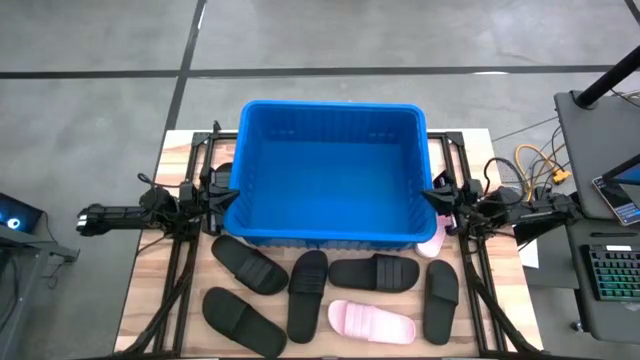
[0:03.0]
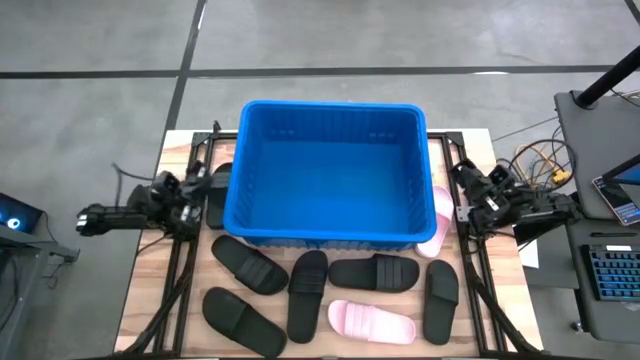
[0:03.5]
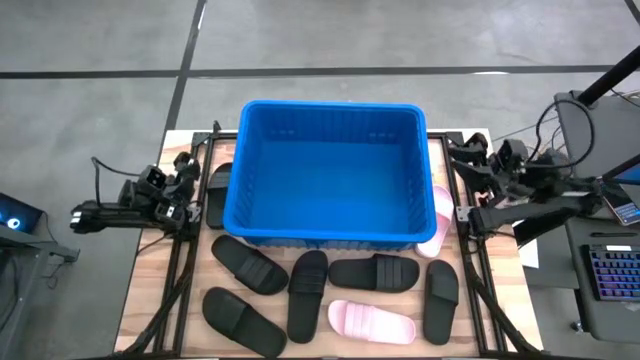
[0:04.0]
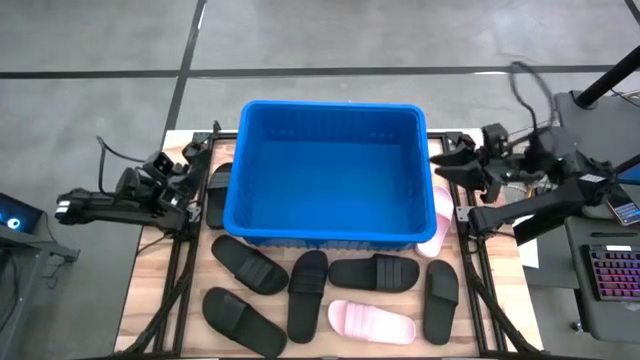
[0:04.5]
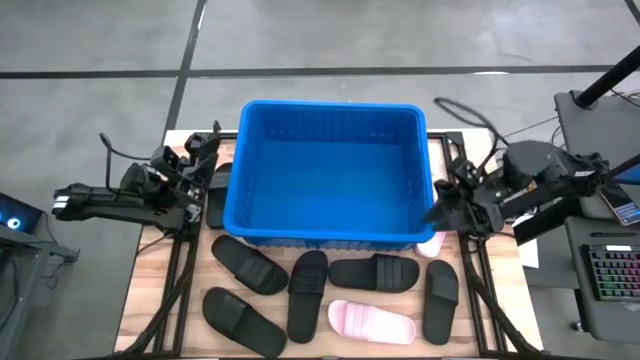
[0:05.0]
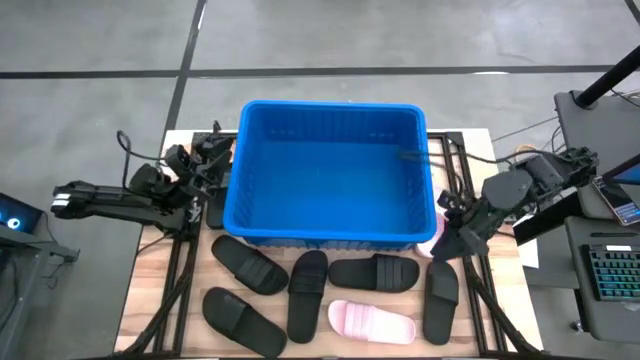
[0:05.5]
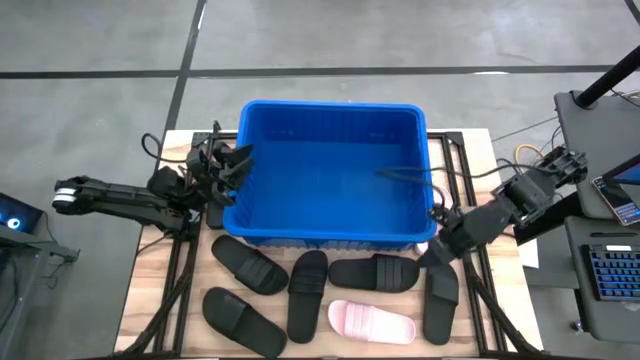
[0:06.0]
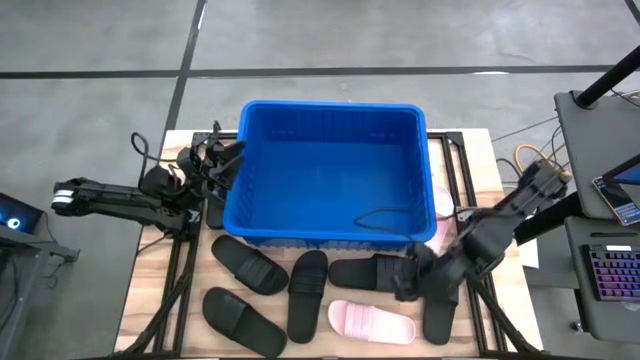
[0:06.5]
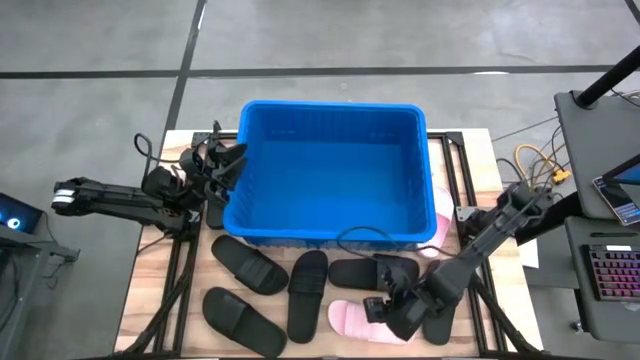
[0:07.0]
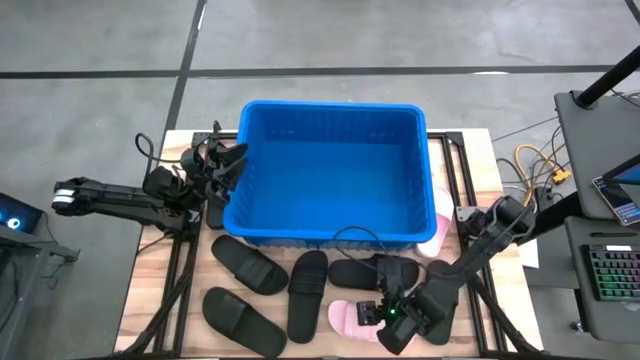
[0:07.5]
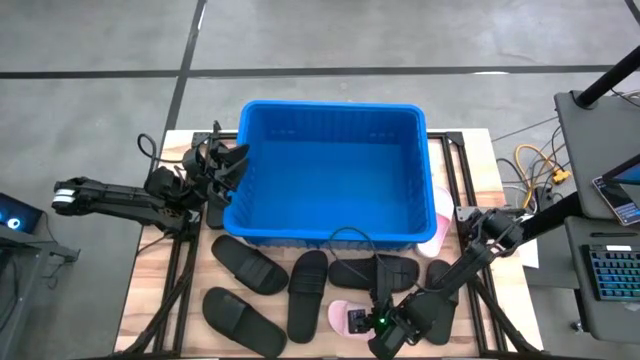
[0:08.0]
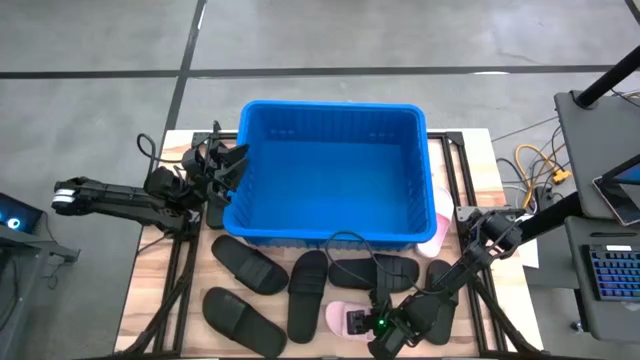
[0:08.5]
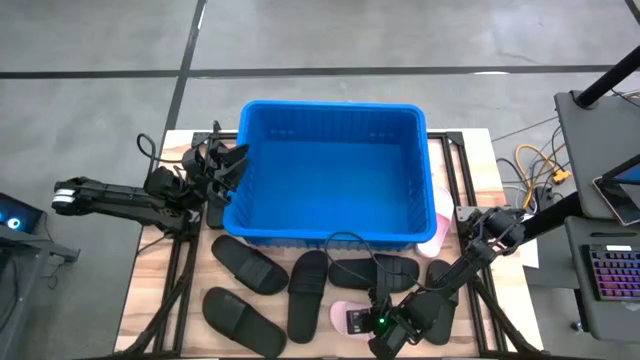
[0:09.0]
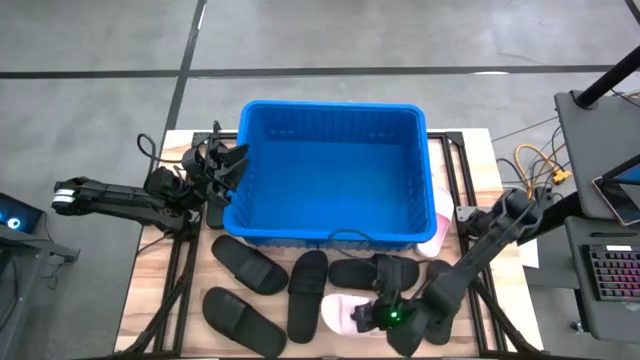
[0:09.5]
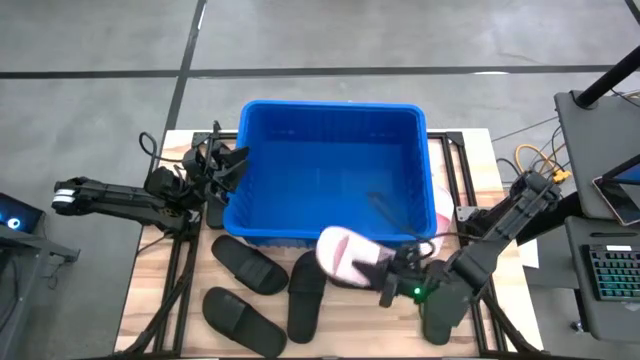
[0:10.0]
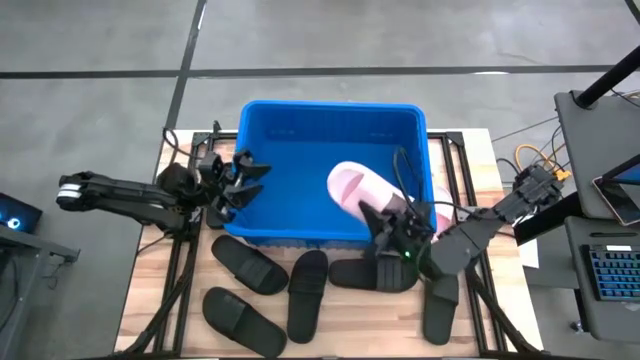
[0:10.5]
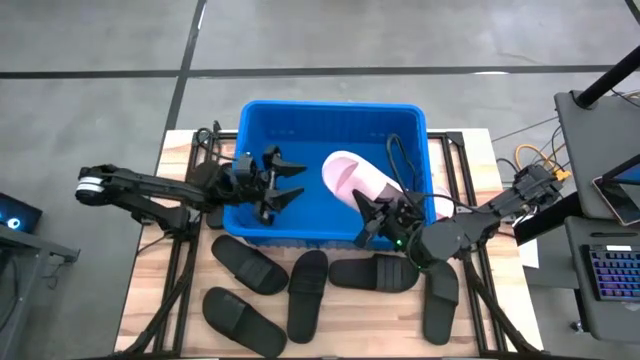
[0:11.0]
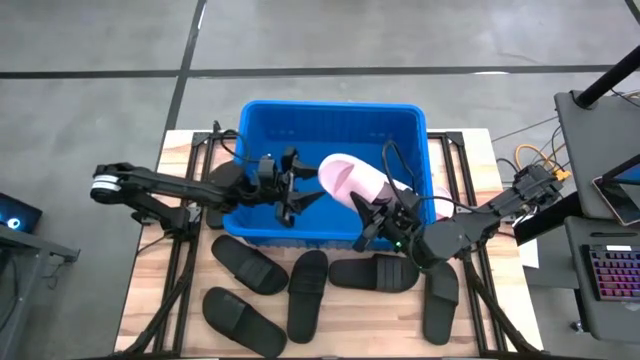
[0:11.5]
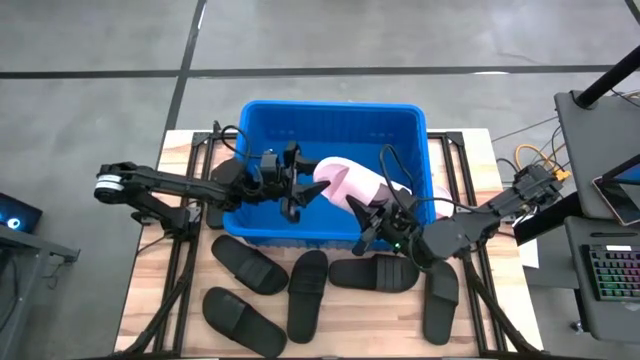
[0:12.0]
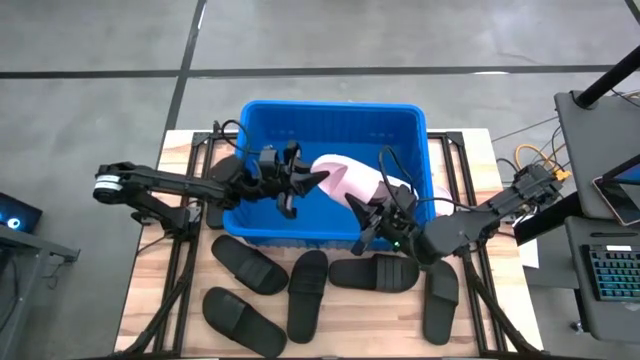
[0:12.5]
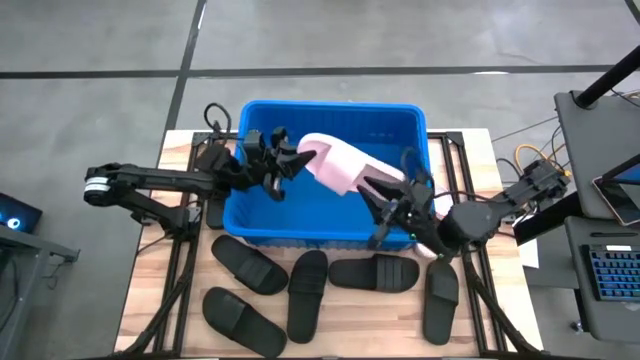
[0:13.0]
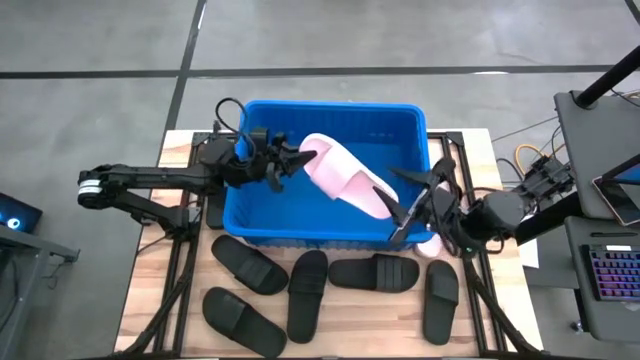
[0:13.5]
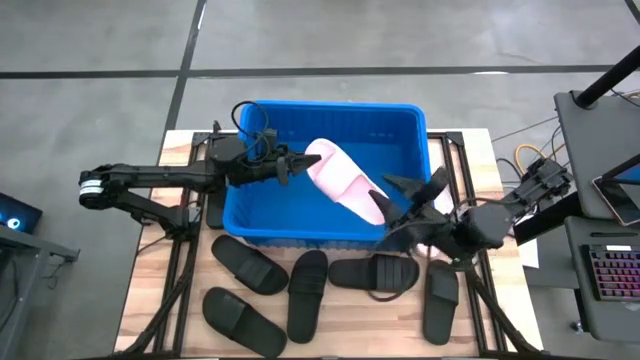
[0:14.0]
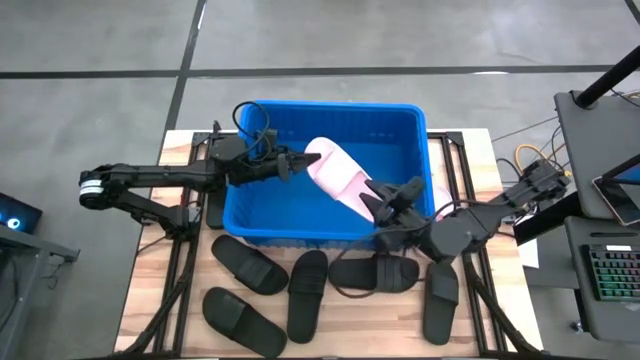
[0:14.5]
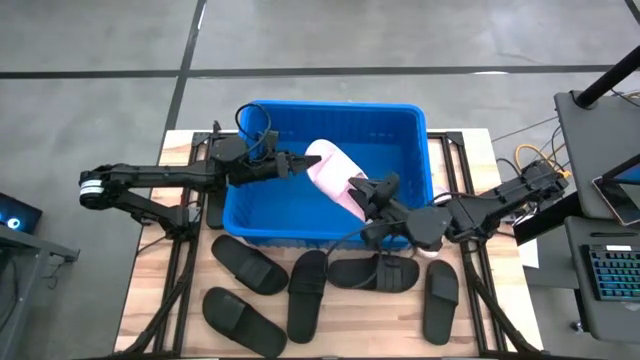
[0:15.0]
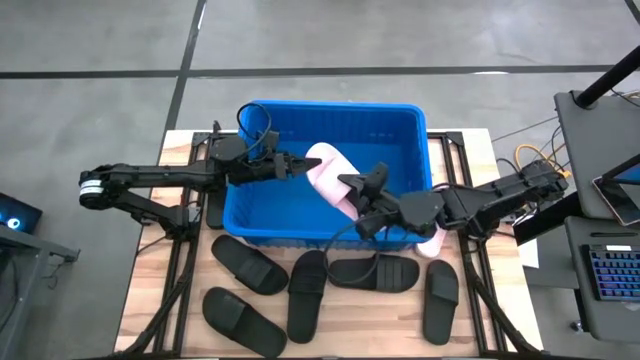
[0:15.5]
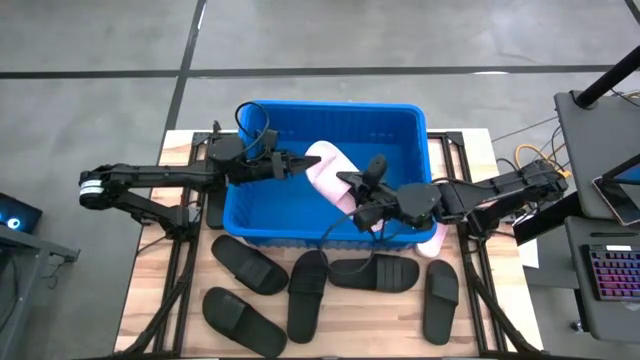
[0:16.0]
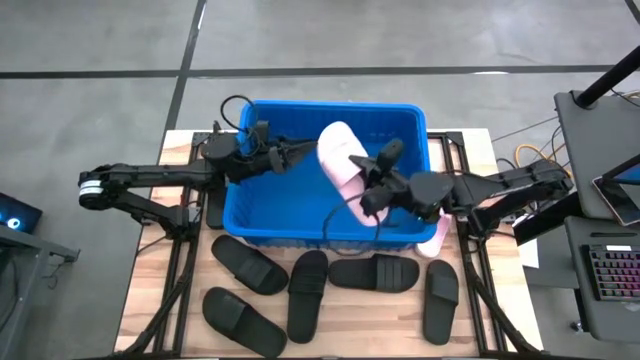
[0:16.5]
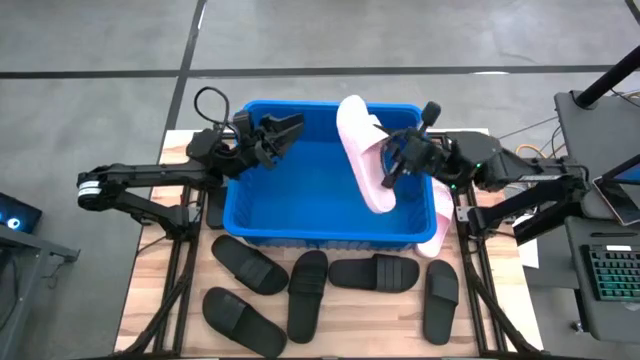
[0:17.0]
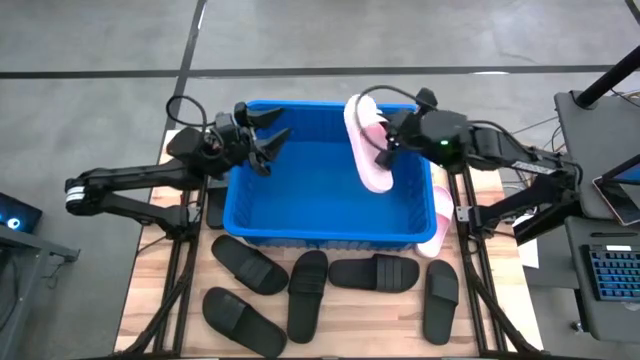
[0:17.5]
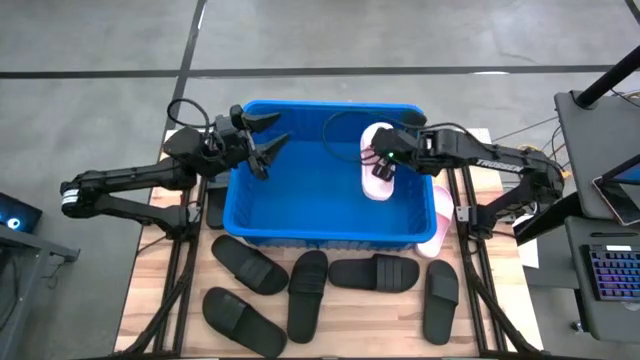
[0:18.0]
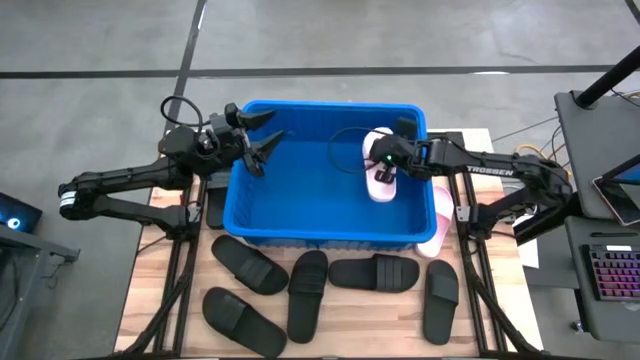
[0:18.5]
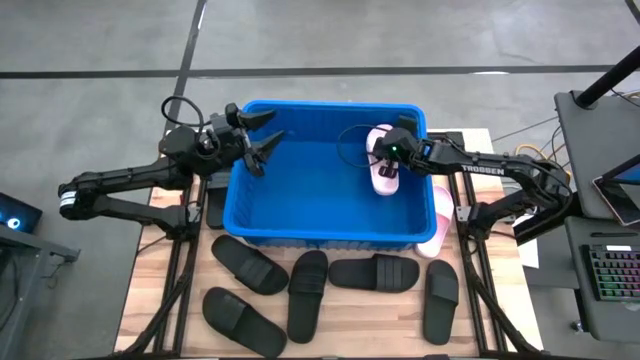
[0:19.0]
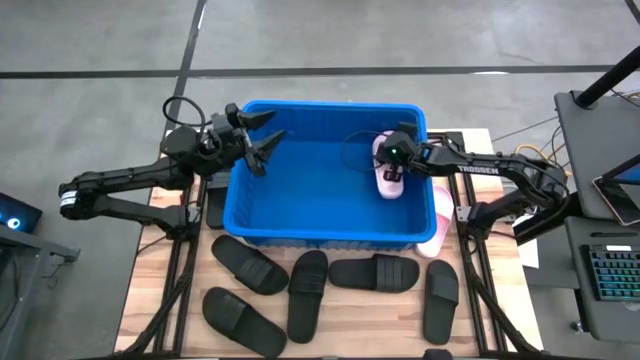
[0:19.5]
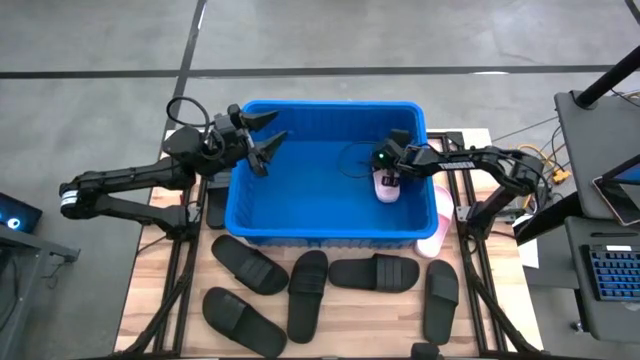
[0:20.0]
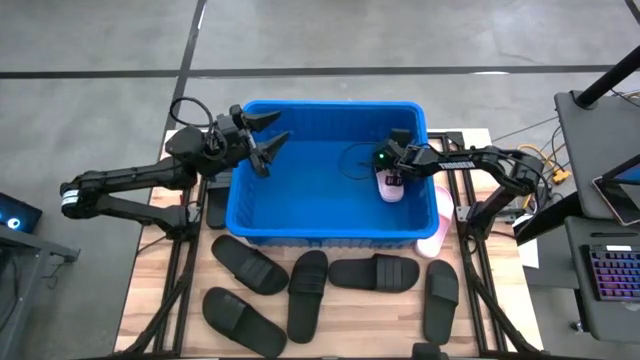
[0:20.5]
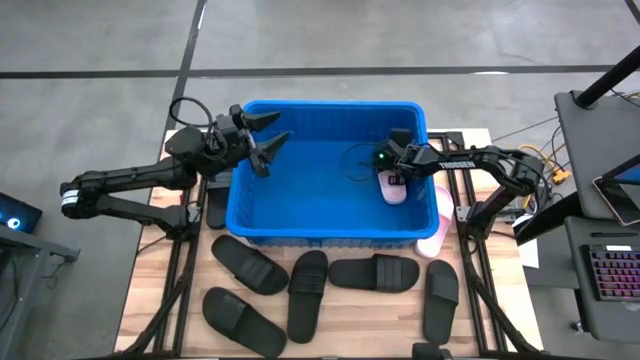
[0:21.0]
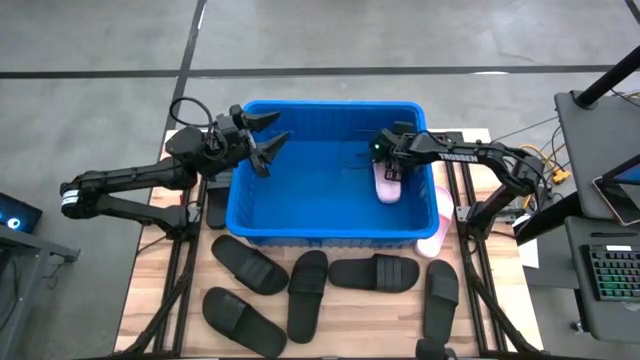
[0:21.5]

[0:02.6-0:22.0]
Task: Pick and place slides into bin
Put the pink slide into the blue bin

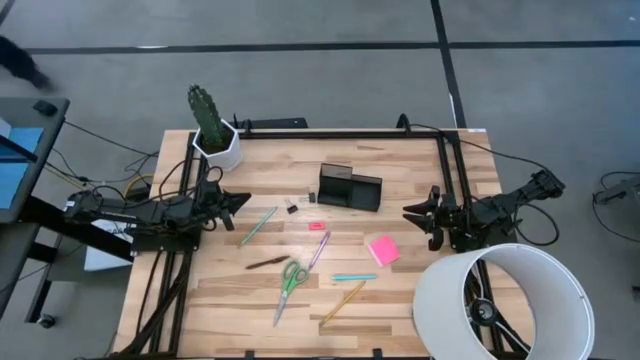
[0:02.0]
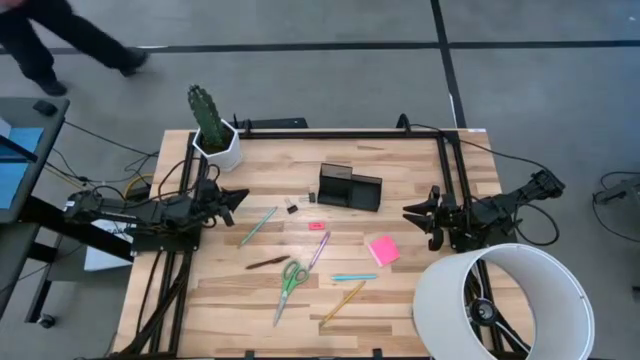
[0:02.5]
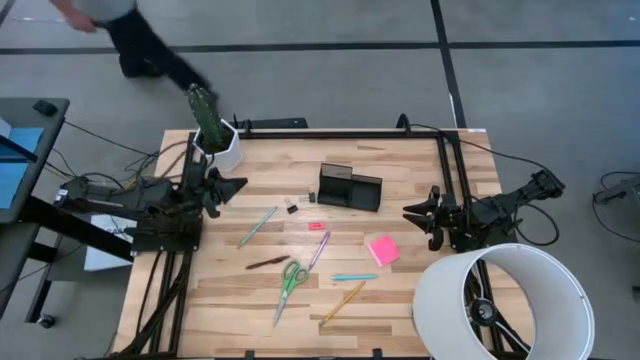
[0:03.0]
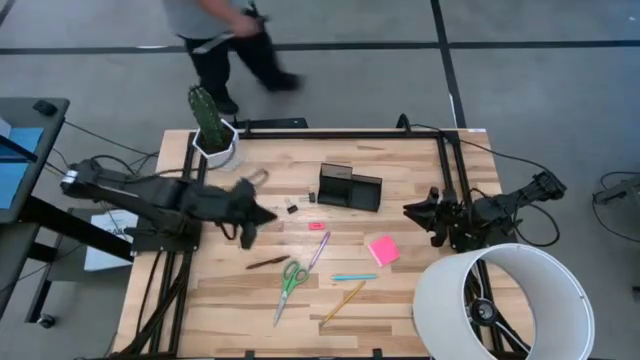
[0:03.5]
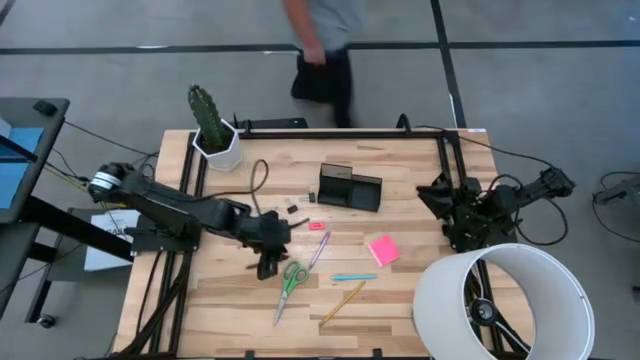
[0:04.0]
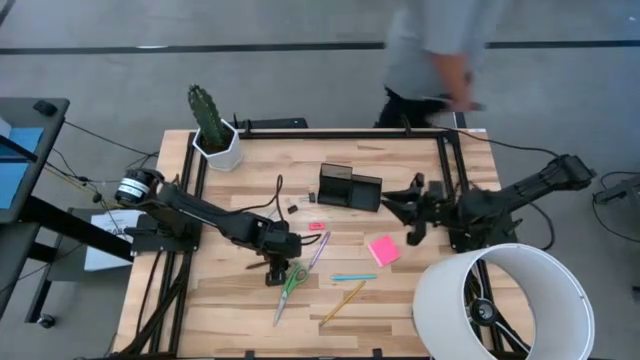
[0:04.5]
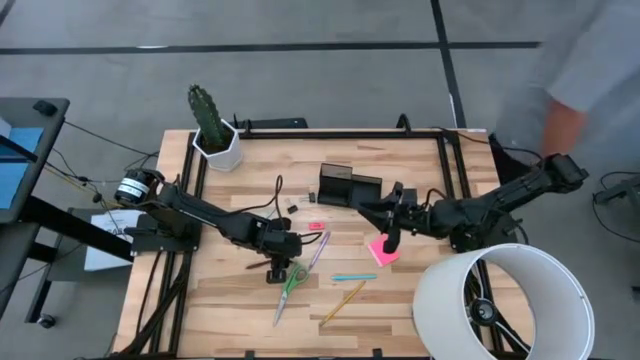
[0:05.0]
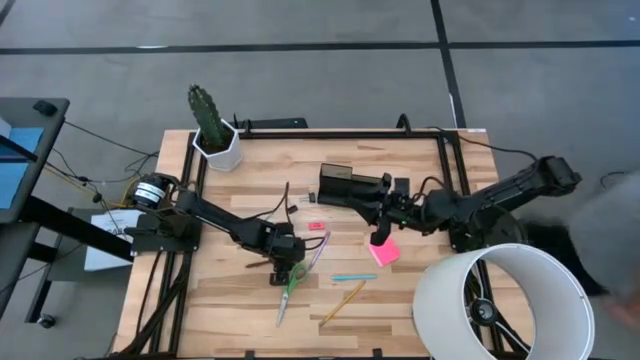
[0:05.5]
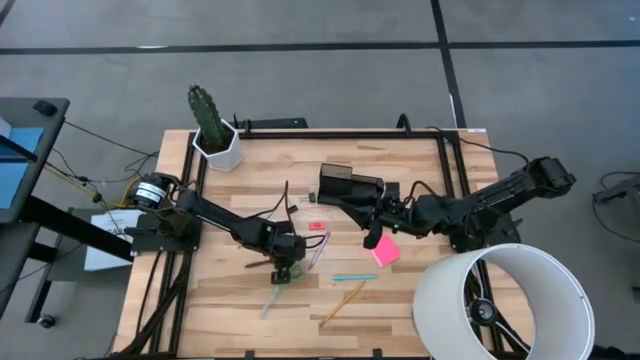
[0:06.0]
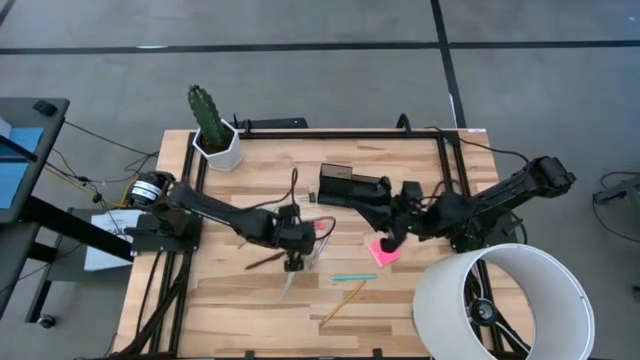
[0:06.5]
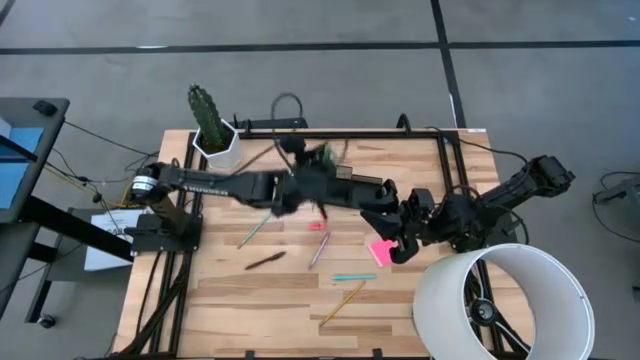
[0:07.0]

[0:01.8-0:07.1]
Task: Pick and place office supplies into organizer
Put the green scissors into the black desk organizer
